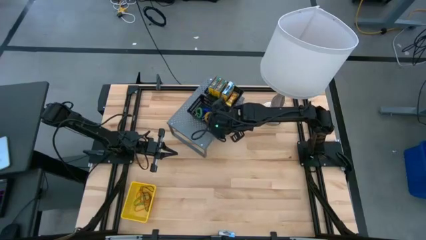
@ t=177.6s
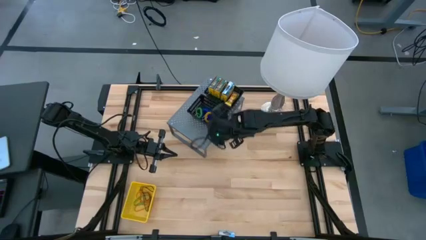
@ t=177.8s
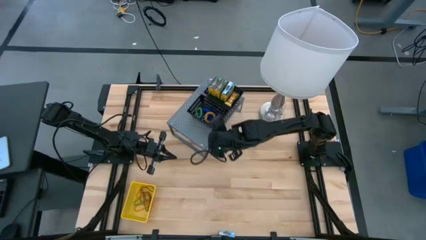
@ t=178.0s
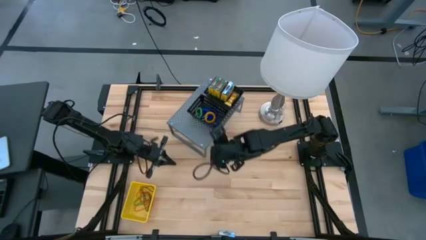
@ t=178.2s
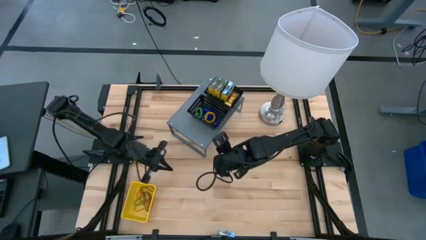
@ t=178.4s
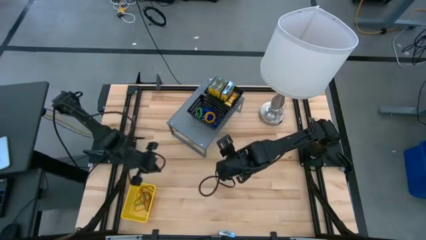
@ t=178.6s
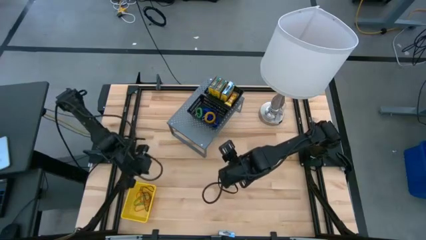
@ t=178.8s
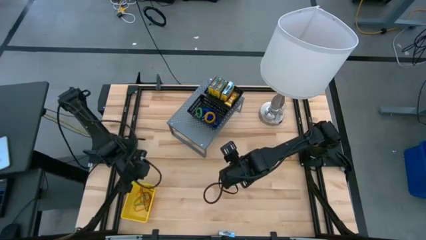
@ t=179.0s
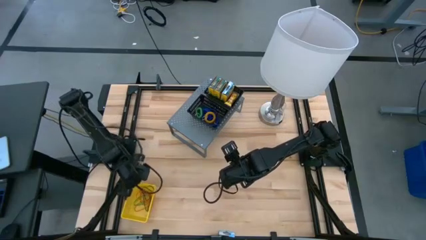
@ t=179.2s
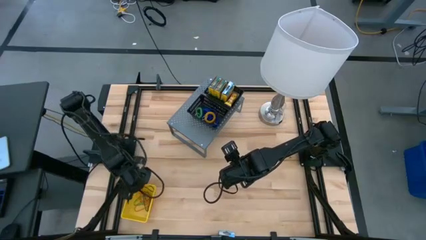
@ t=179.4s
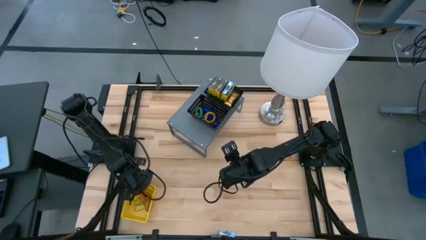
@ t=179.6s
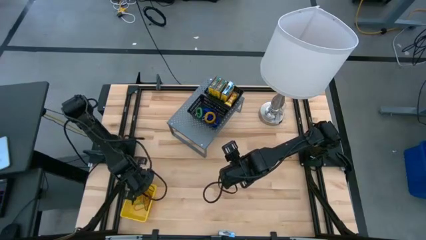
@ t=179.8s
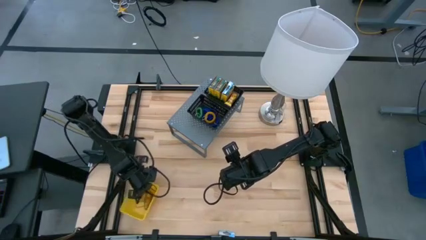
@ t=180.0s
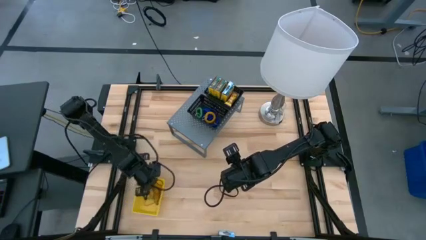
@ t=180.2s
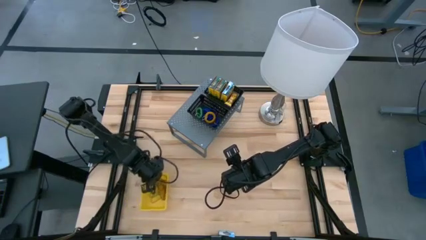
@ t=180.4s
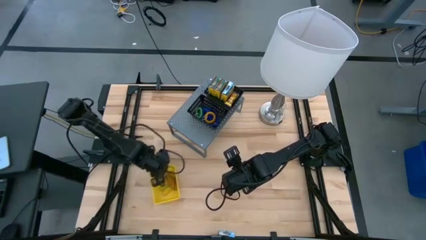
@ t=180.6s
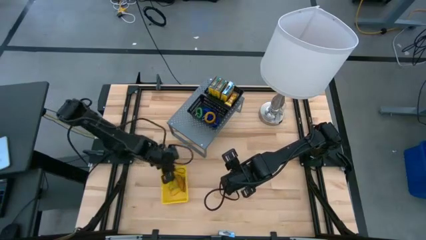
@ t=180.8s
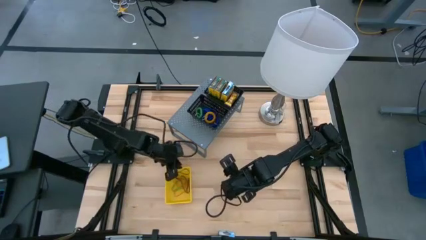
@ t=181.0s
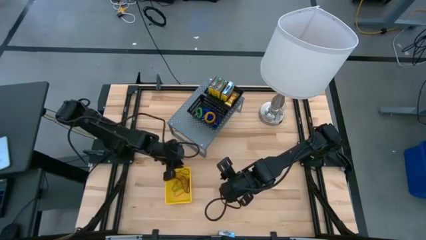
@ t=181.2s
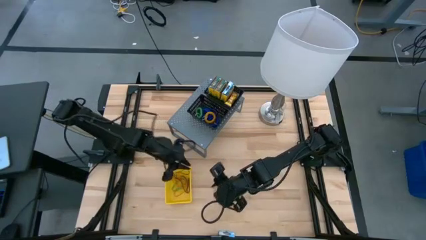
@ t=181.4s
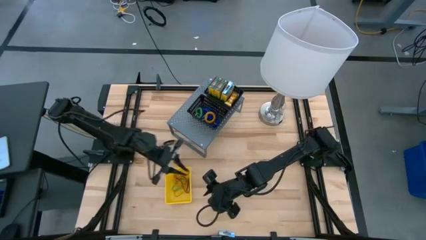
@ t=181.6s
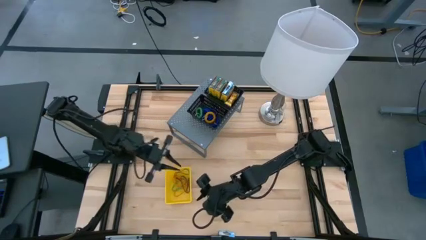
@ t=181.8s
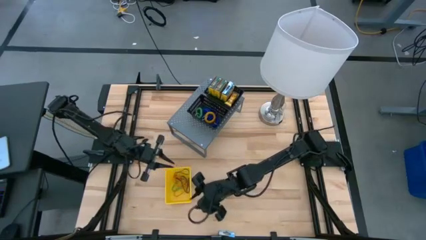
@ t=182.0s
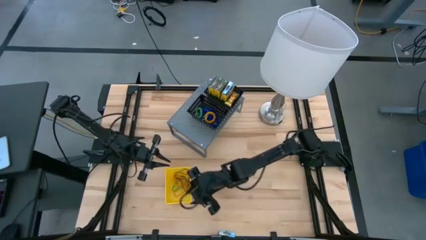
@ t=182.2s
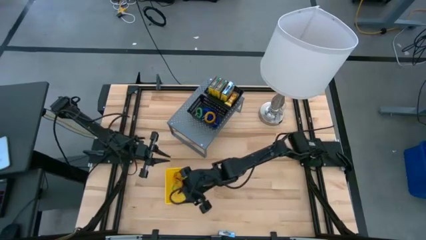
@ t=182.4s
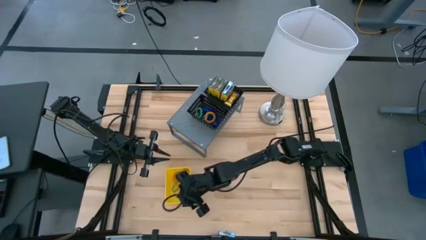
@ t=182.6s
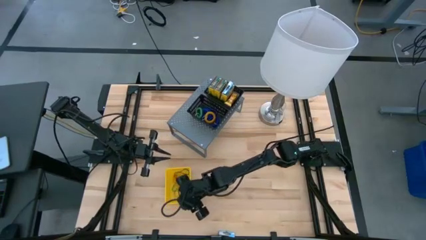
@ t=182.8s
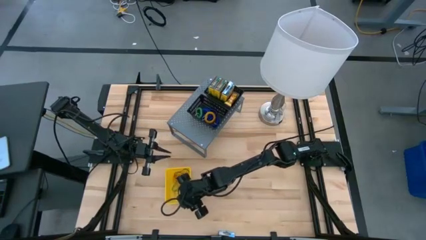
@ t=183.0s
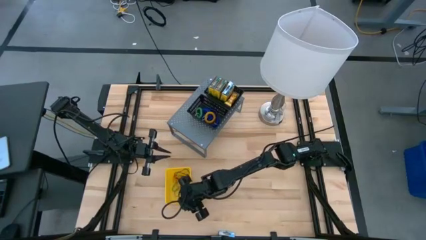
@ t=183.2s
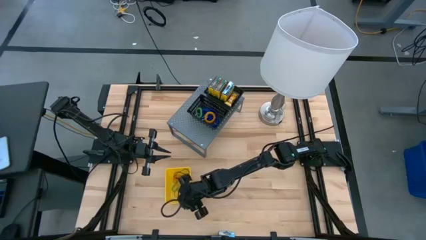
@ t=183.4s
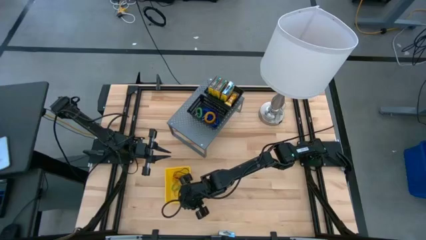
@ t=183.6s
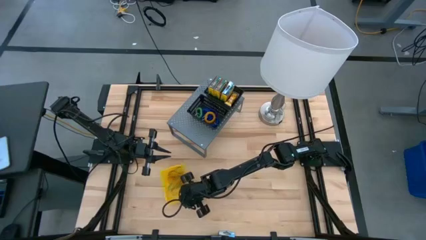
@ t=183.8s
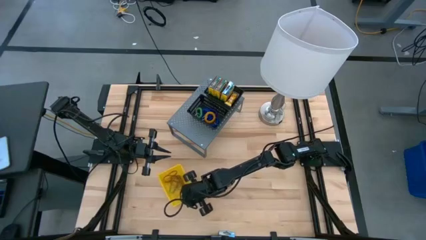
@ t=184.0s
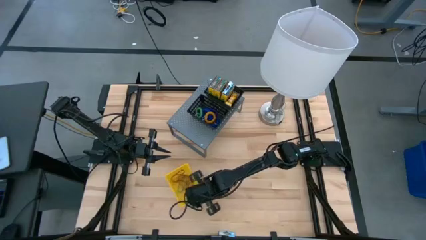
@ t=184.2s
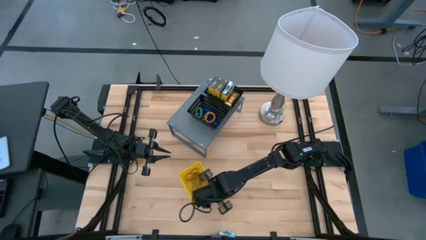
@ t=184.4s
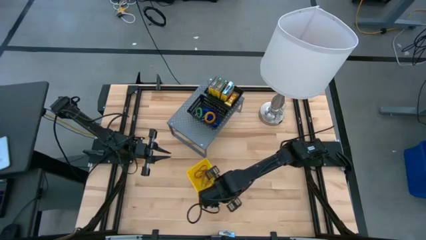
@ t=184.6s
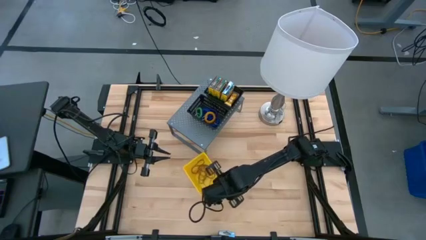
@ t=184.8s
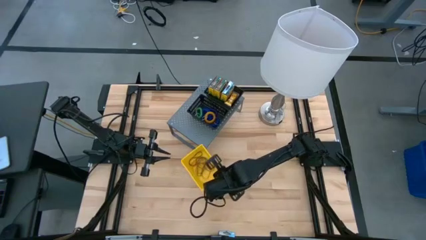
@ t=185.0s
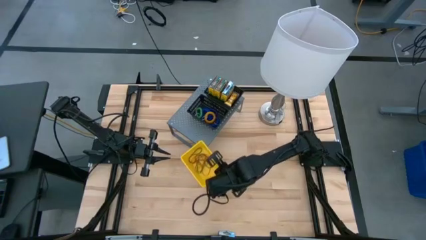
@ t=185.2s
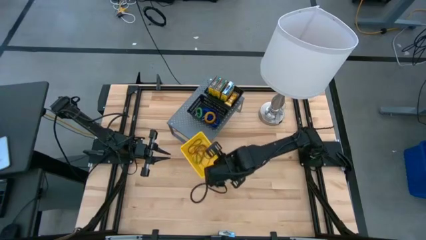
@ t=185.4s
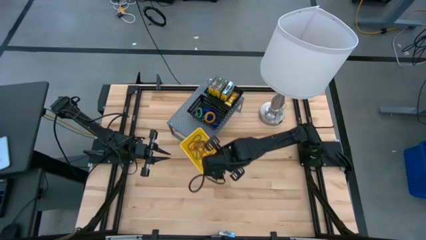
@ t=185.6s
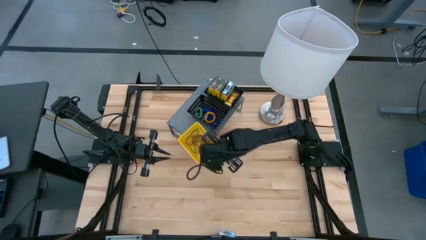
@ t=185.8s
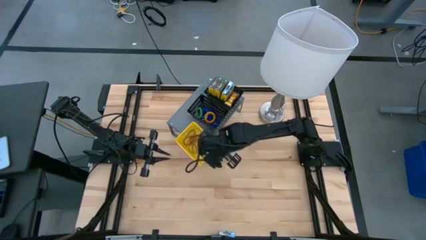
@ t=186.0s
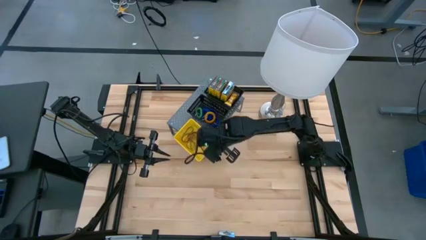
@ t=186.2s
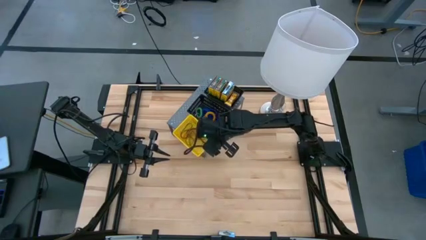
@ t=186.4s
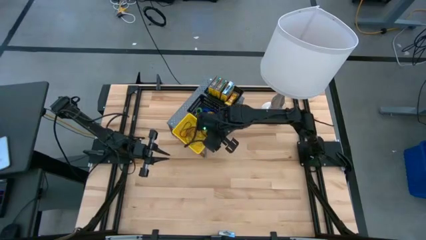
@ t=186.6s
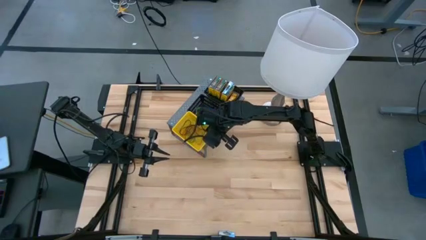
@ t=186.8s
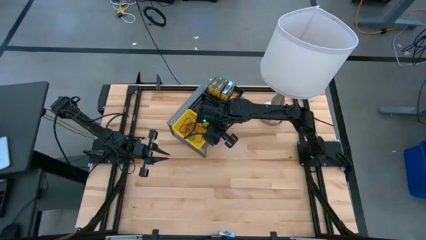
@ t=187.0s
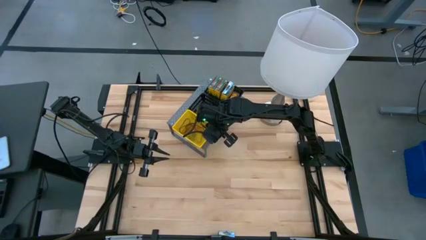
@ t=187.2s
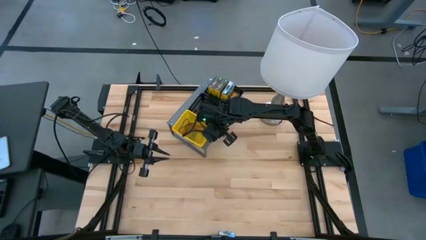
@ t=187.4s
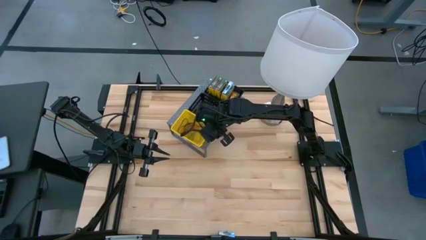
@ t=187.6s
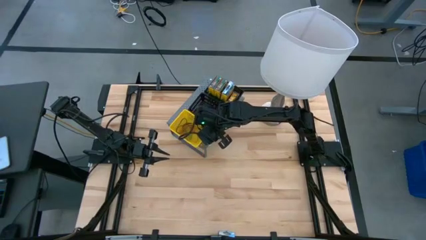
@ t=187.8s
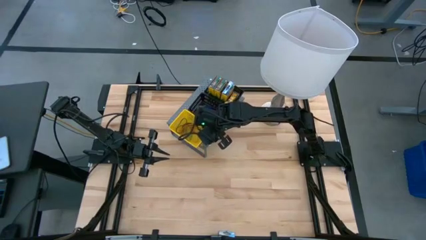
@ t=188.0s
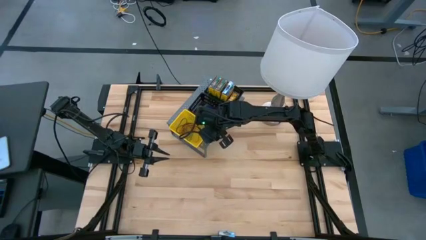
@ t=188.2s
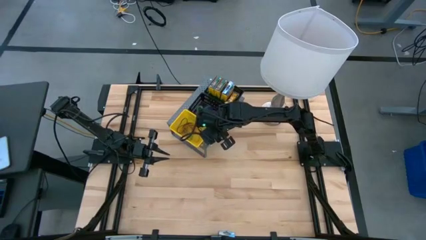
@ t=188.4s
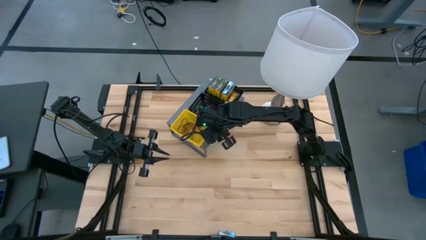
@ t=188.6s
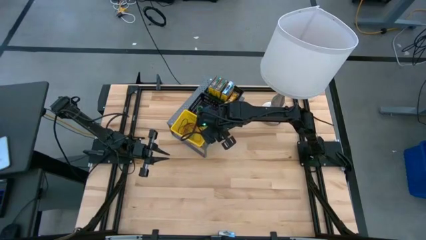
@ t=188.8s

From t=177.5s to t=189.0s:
Task: Pick & Place Office Desk Supplies
Put the yellow bin on the shelf
